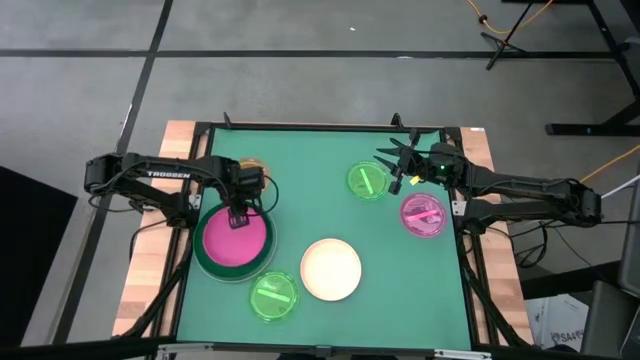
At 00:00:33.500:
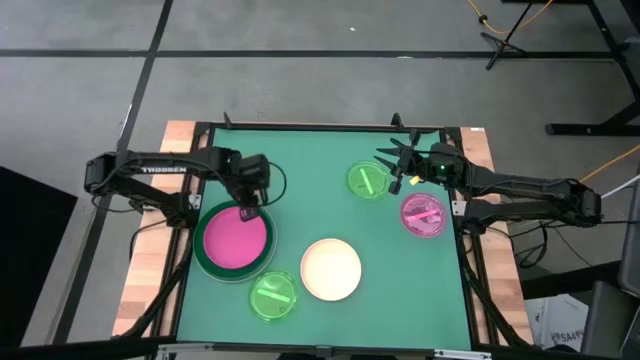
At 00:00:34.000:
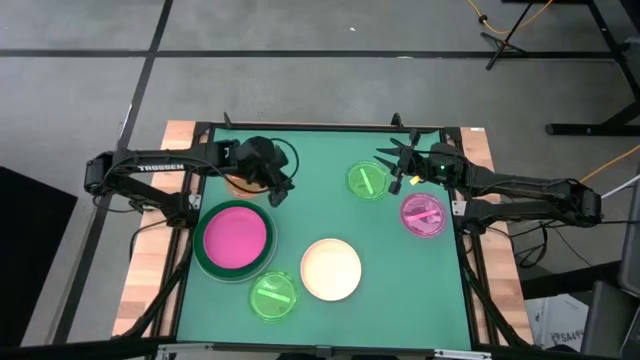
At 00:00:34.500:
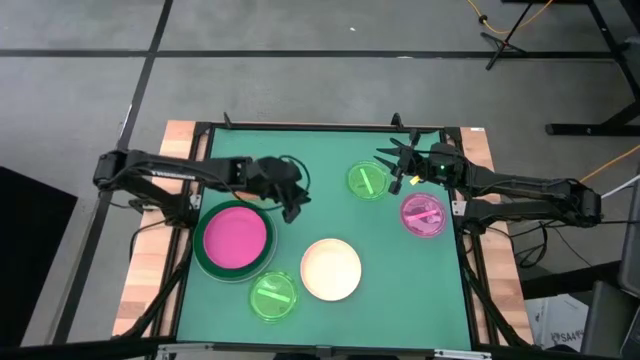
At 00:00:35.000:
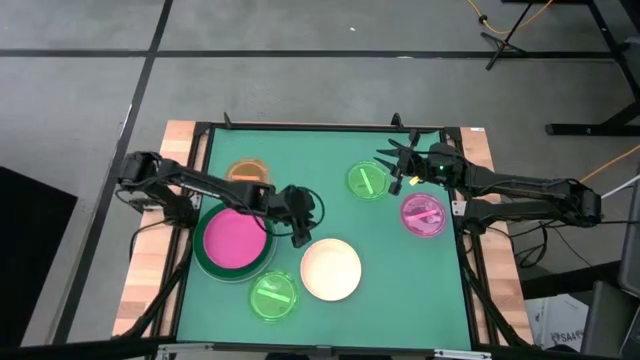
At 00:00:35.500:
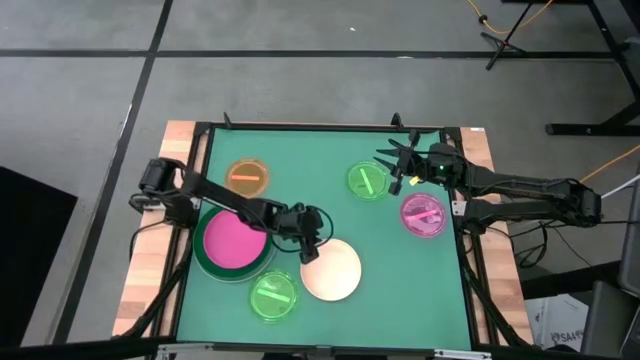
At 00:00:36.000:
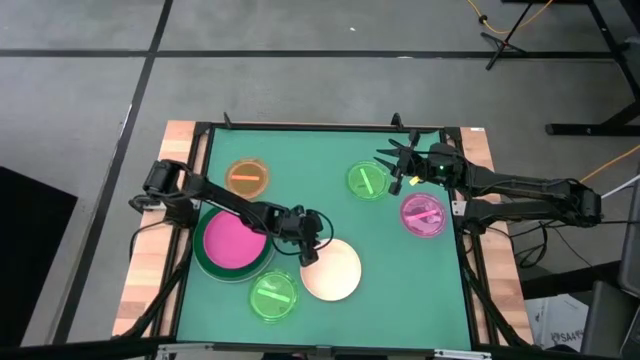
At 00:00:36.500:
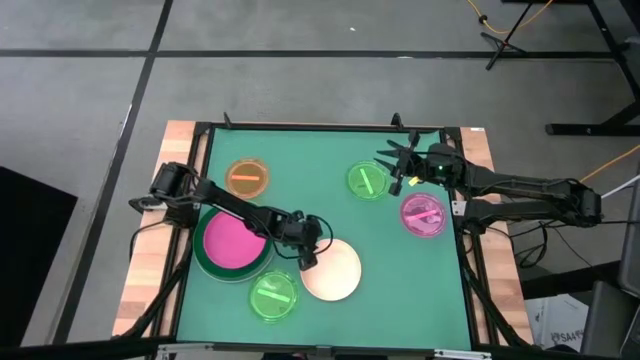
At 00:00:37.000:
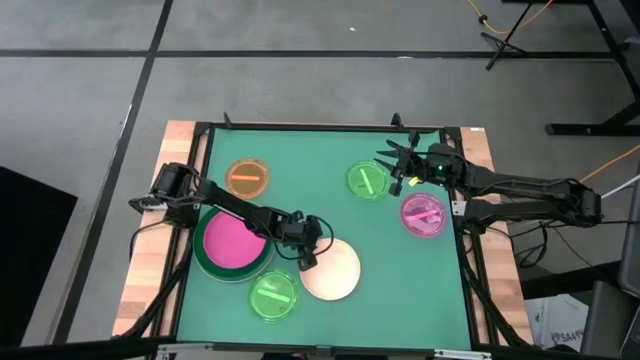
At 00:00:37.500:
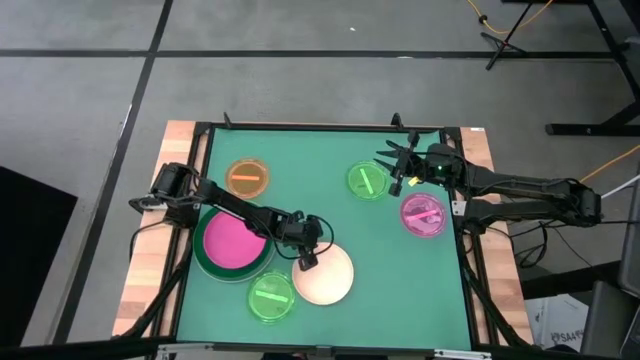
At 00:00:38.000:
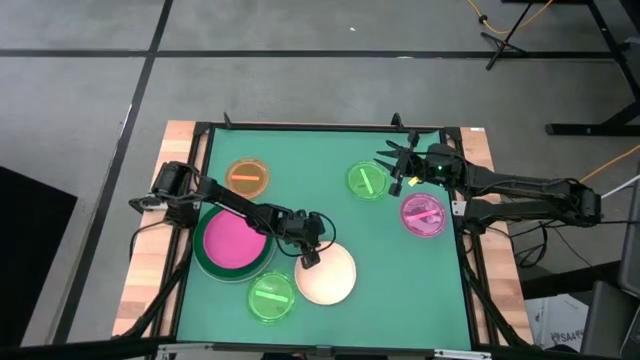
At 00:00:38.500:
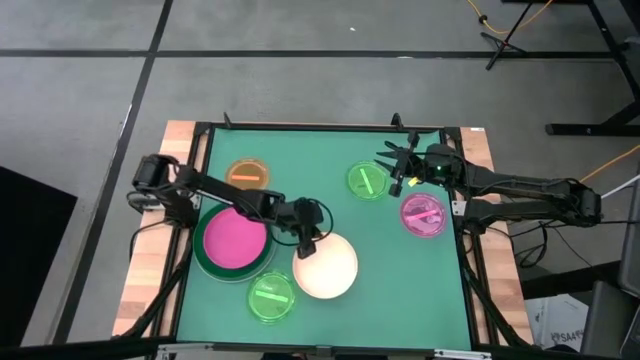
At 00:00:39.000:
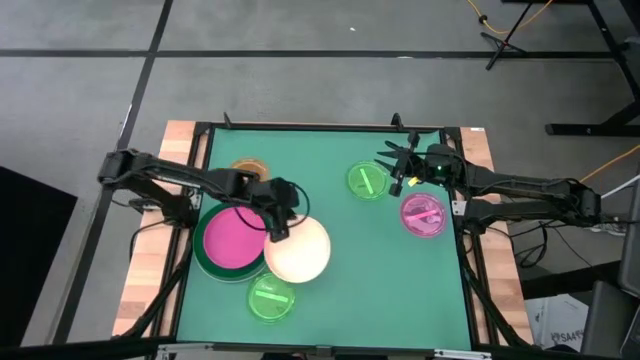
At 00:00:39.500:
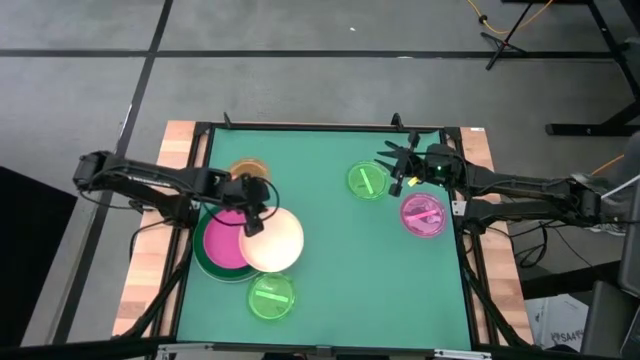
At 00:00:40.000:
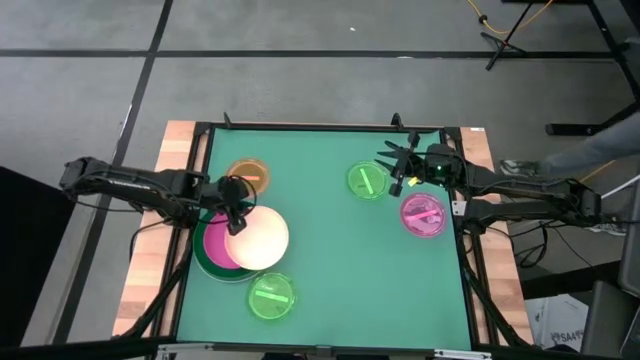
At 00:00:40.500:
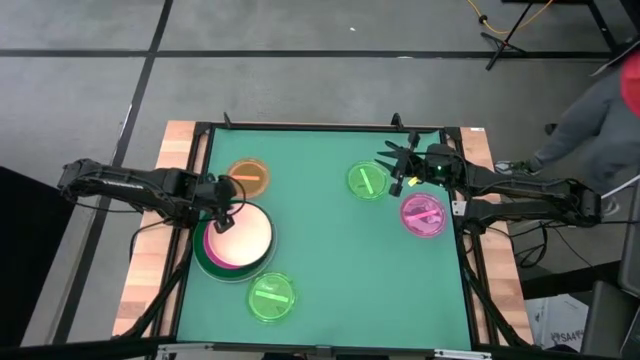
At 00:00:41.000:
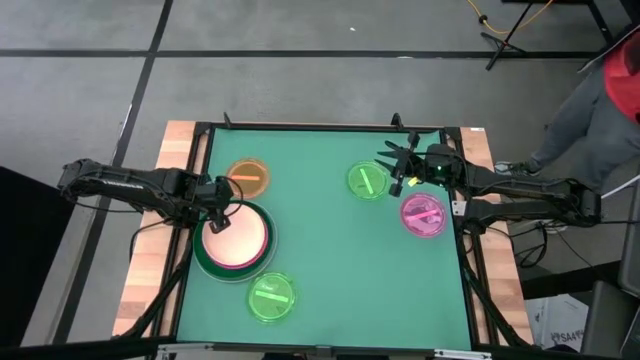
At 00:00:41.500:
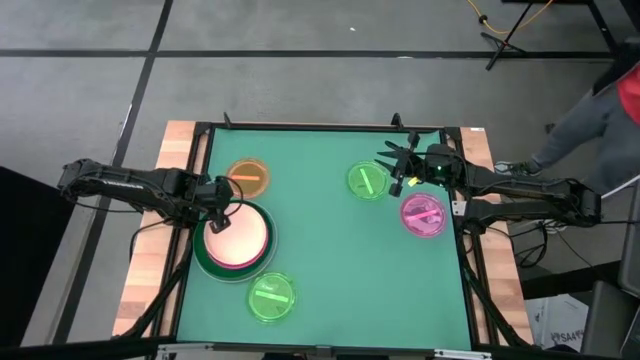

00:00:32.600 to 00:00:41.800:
Task: Stack plastic plates
Stack the light orange plate on top of the pink plate

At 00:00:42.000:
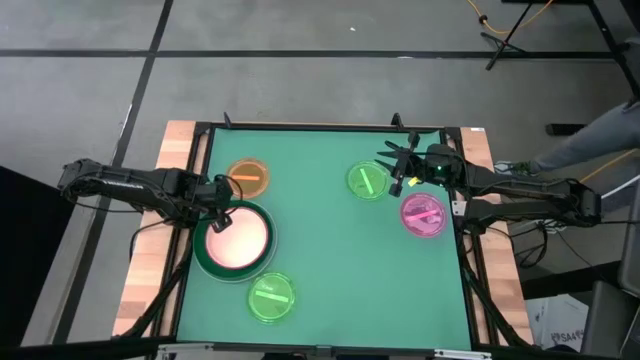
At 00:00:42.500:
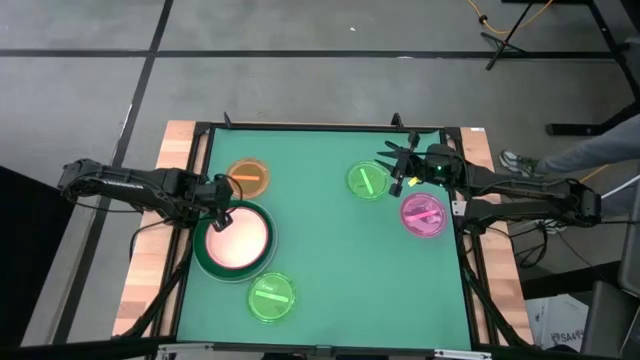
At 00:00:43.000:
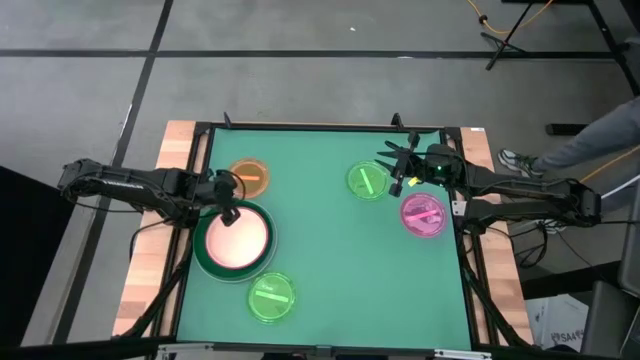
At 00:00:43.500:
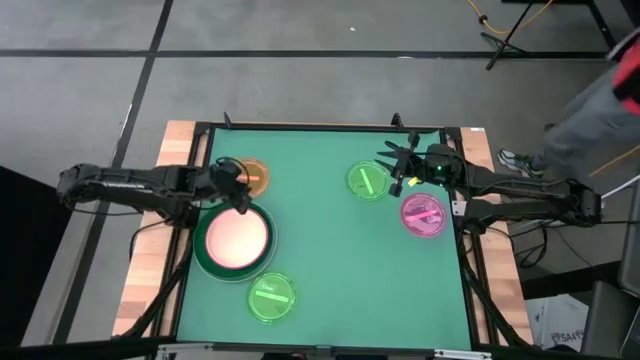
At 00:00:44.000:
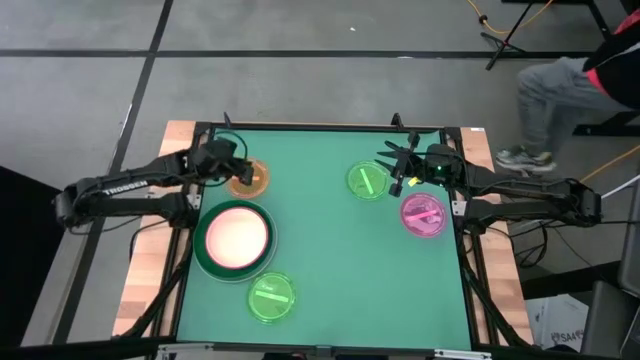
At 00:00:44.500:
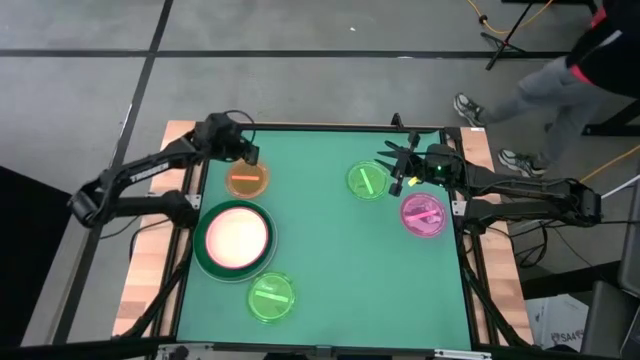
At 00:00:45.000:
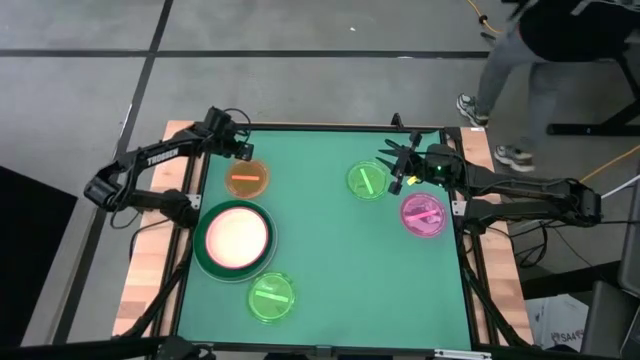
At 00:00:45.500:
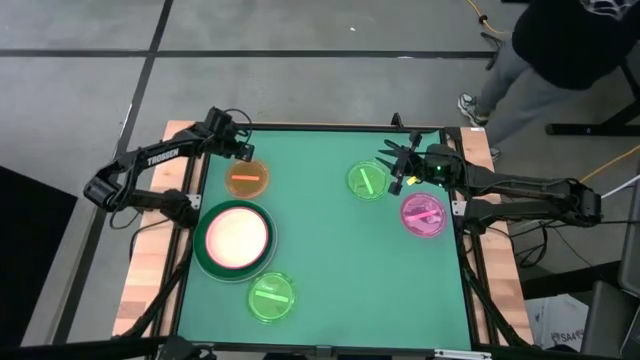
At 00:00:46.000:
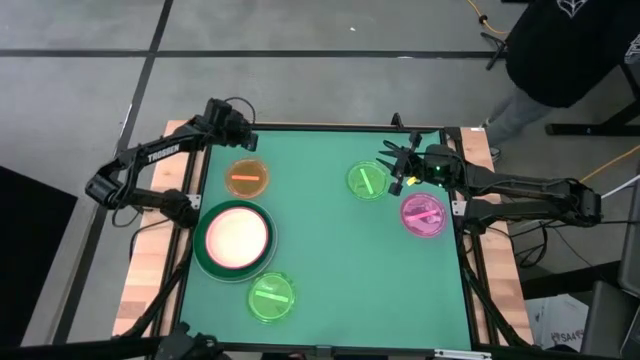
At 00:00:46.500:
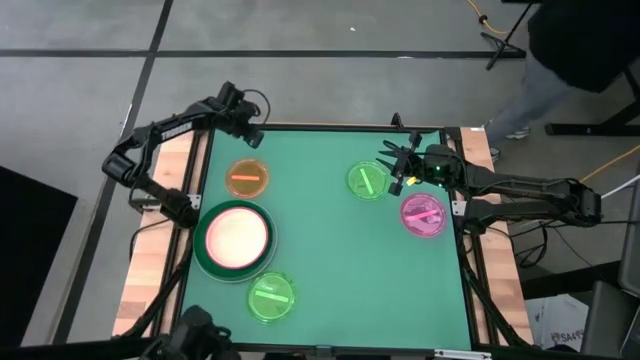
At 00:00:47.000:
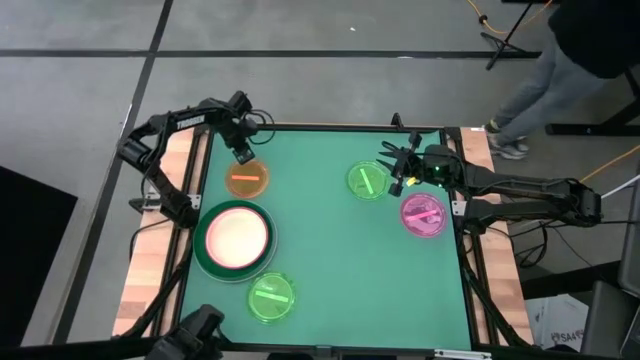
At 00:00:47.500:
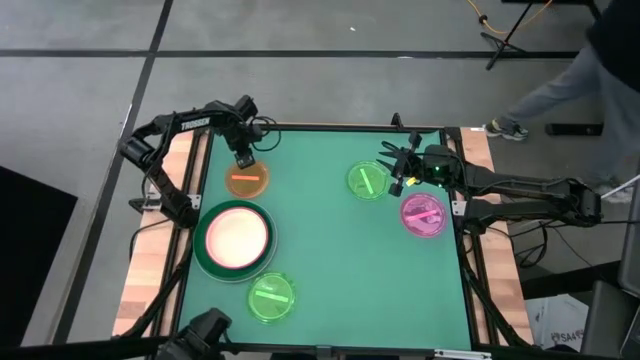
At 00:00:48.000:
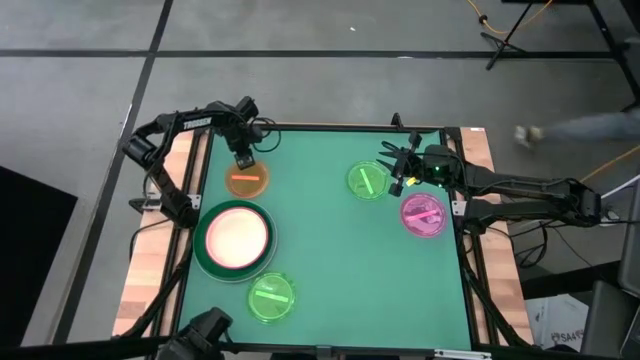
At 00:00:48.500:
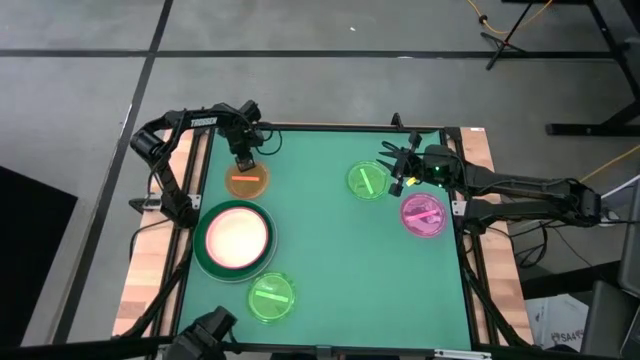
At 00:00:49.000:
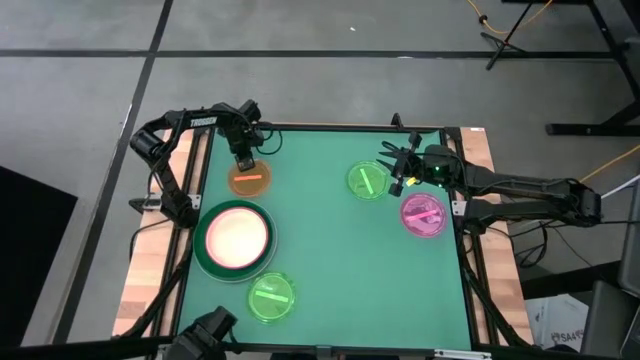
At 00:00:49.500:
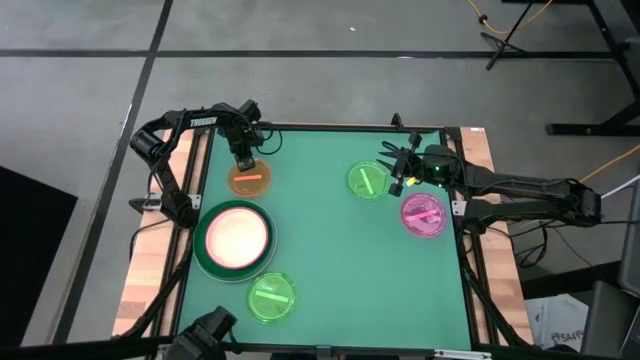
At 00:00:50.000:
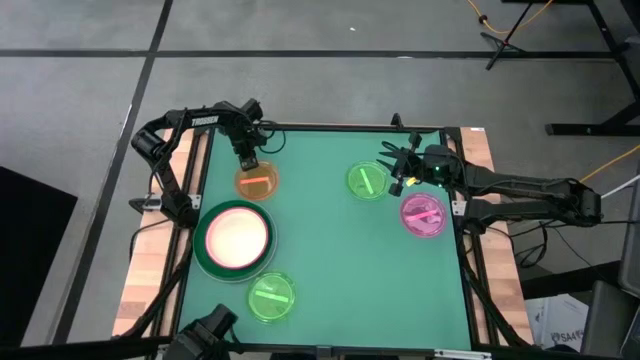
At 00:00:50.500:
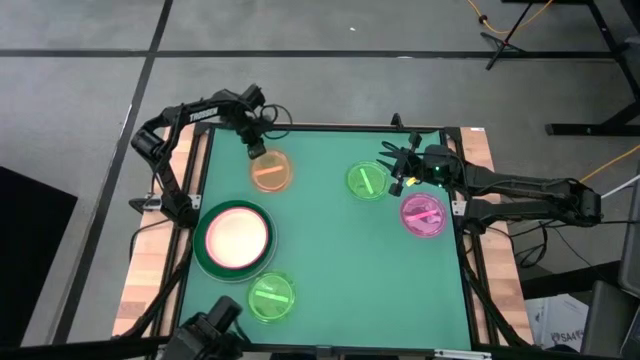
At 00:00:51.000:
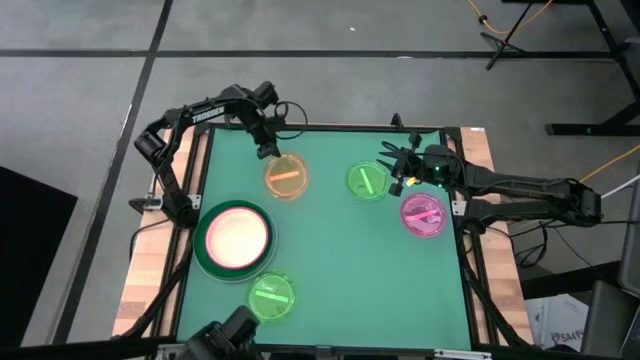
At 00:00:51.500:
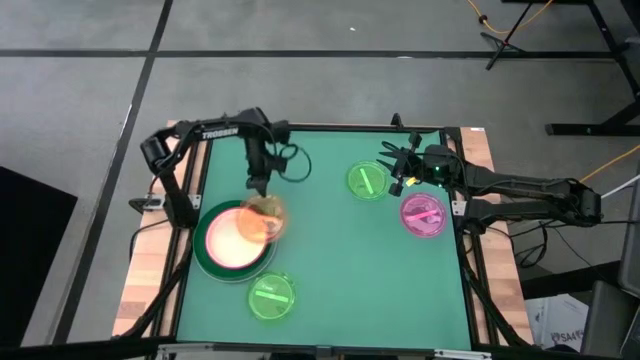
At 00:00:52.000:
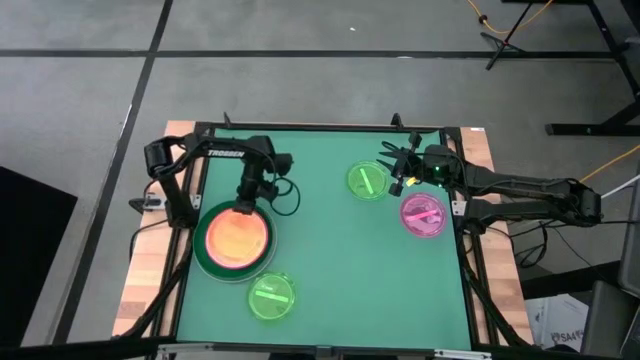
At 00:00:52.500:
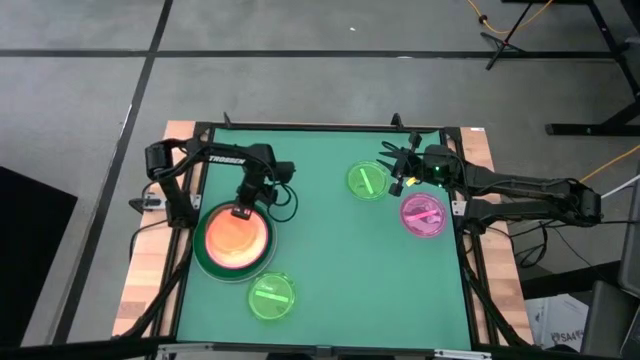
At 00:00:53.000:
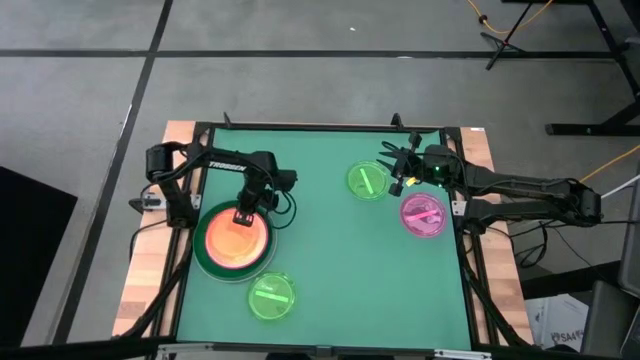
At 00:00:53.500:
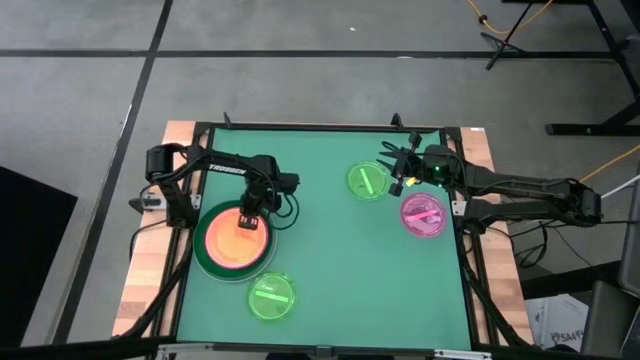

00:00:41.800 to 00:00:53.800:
Stack the orange plate on top of the light orange plate
